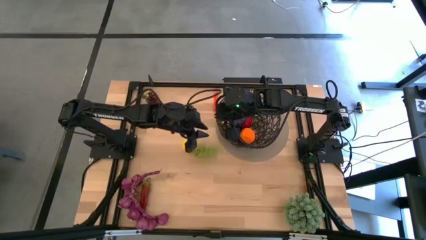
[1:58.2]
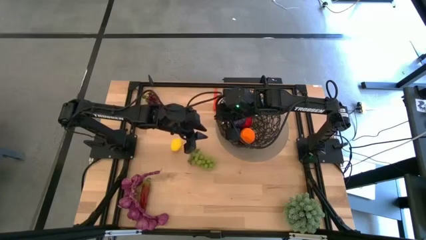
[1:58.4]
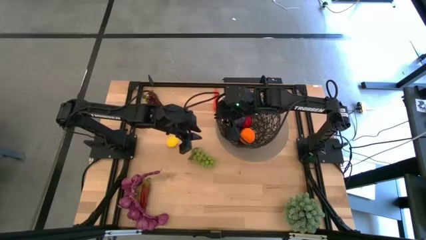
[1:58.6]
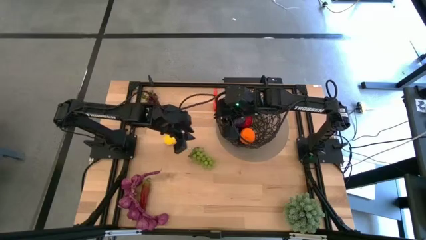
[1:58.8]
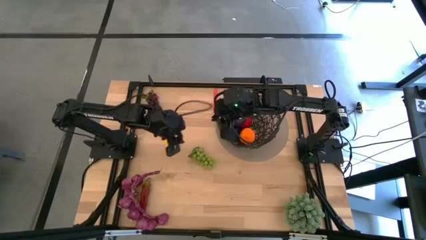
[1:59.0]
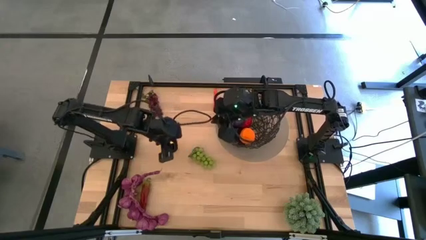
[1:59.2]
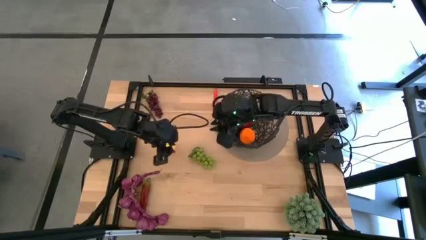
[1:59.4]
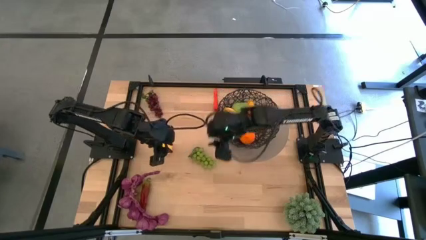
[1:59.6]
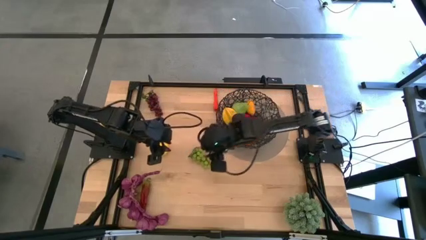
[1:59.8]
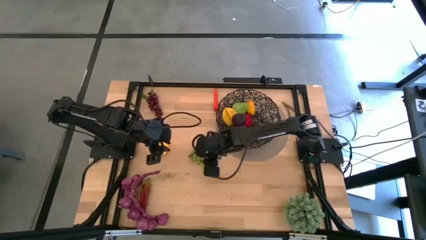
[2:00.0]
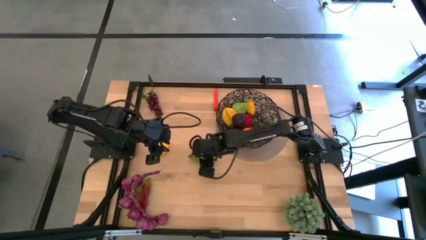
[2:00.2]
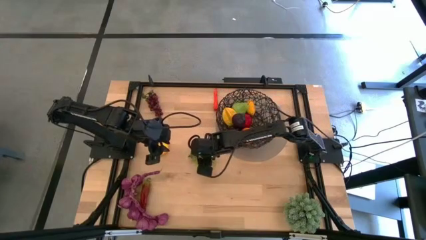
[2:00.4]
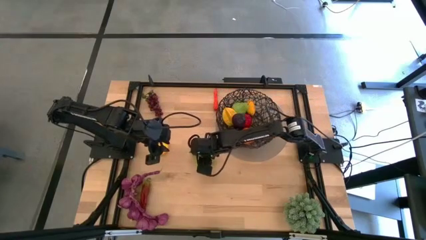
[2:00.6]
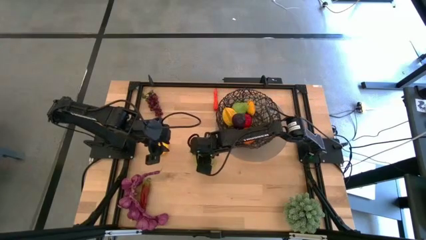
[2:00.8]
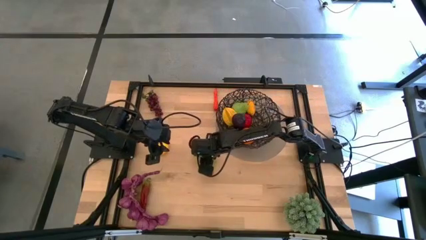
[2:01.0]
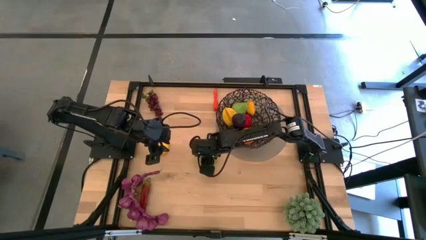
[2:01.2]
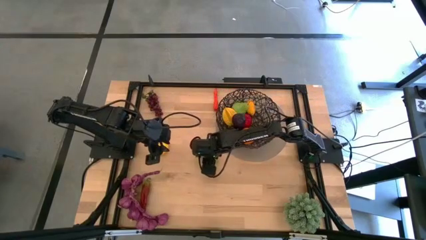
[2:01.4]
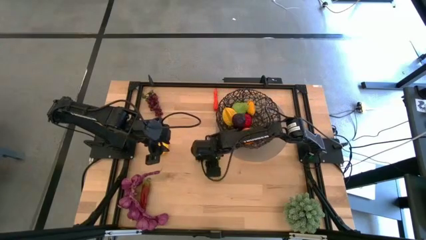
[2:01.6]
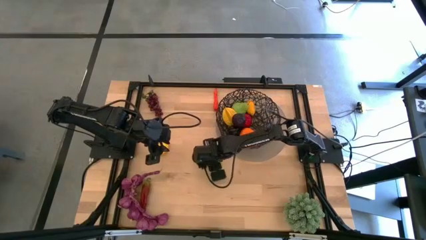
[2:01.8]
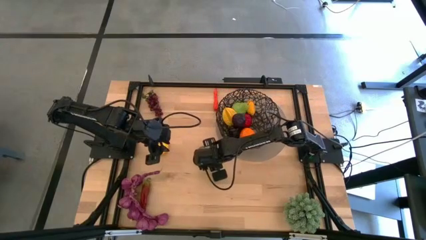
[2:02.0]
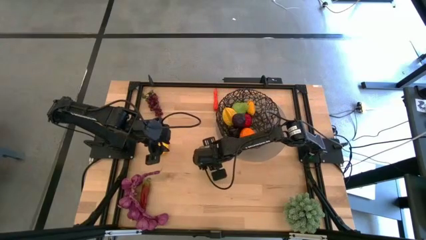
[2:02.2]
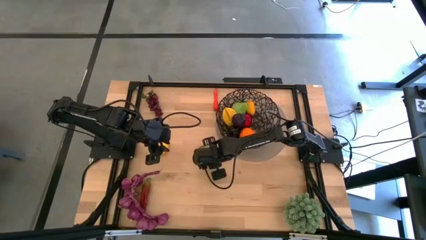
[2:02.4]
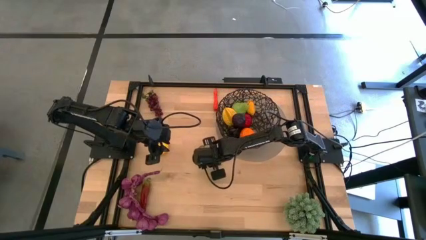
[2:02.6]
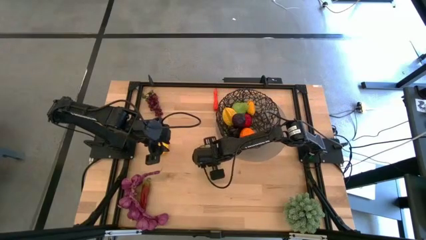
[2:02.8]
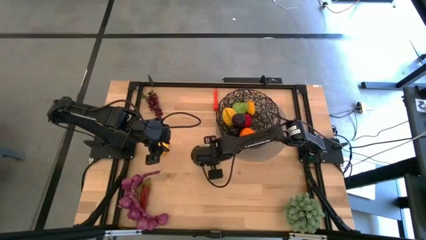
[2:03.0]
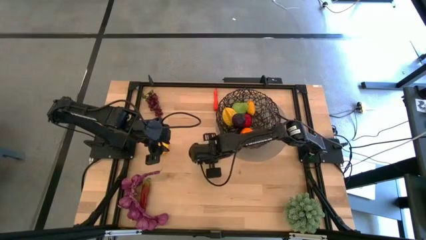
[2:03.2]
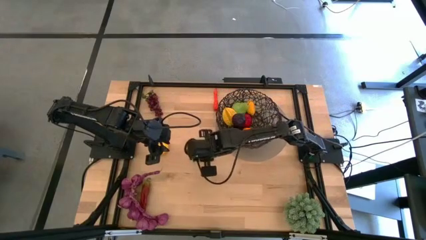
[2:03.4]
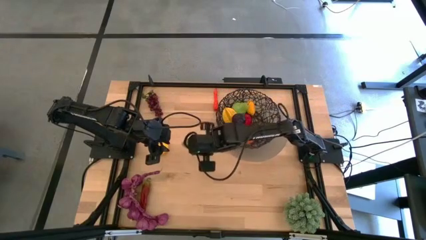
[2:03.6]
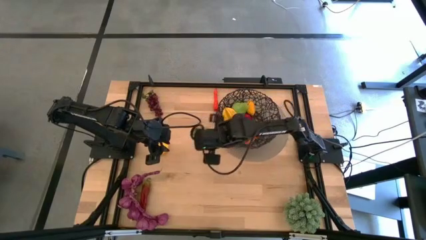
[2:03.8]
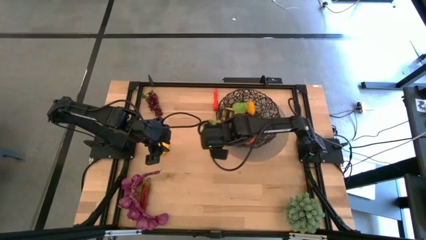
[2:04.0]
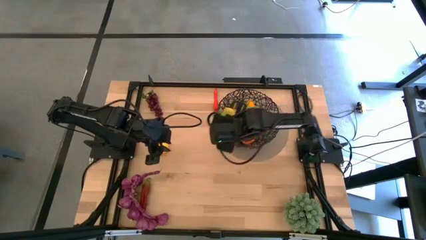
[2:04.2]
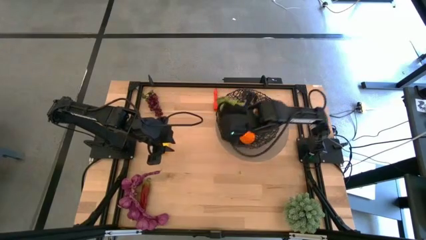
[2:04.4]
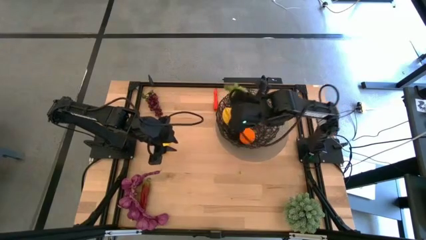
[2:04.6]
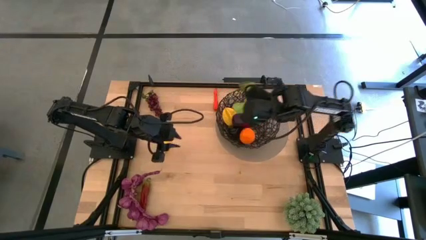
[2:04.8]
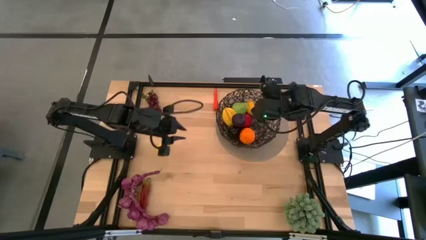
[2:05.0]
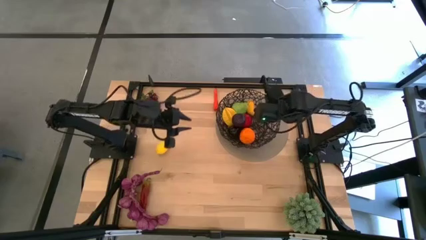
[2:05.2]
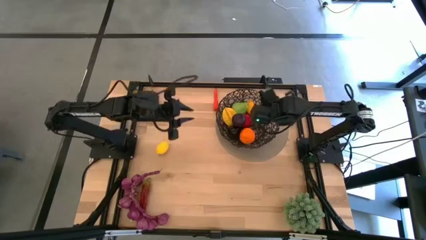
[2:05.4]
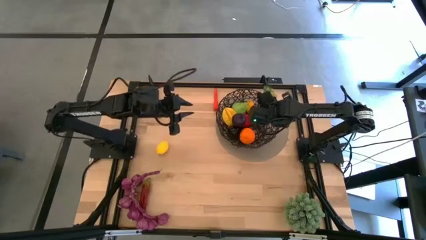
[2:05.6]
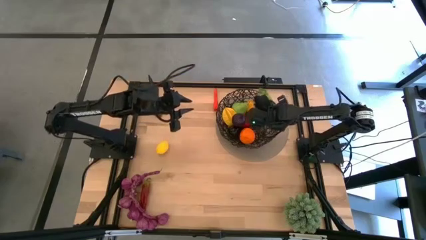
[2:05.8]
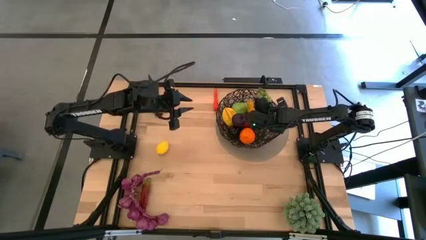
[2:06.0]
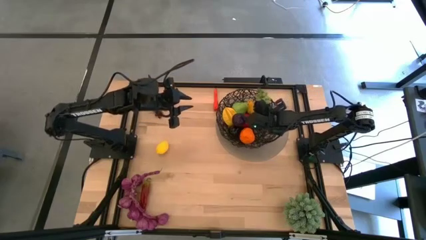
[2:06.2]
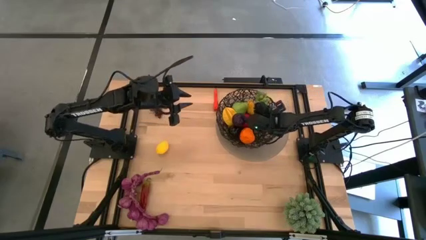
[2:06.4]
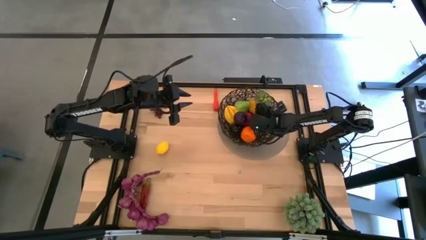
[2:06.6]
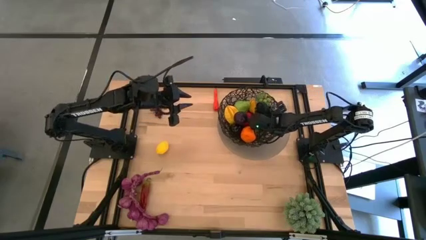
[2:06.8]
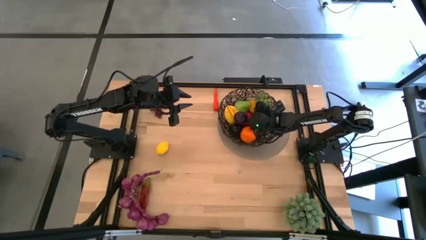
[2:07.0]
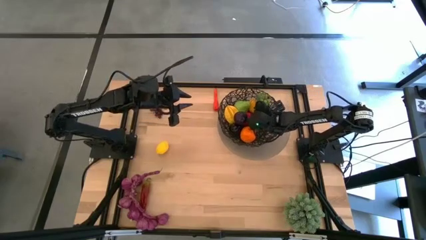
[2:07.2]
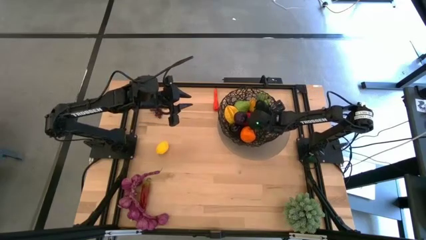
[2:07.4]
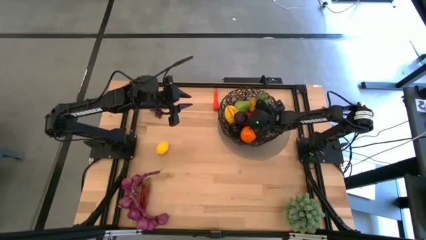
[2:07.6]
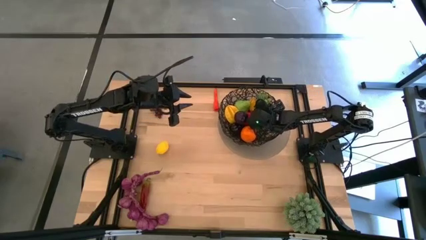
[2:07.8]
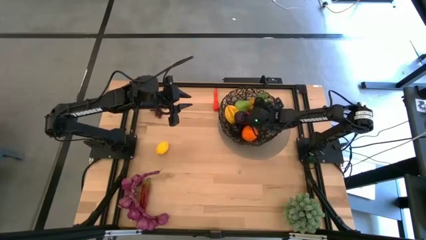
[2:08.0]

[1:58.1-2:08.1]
Task: Build produce basket
Put the green grapes into the black wire basket

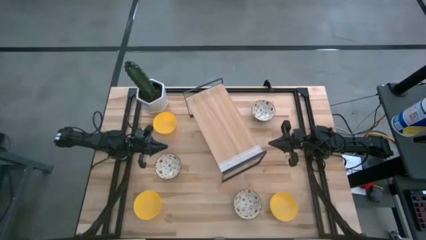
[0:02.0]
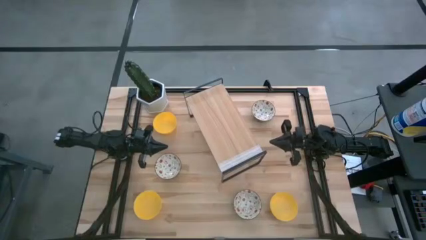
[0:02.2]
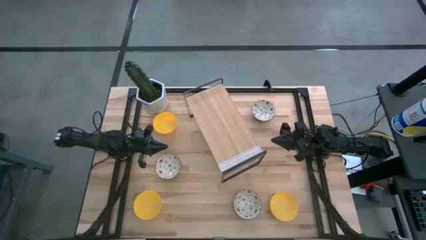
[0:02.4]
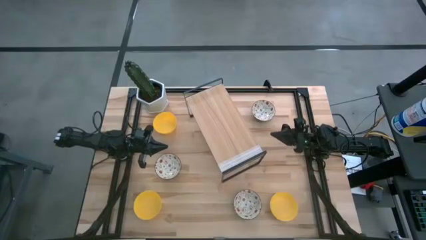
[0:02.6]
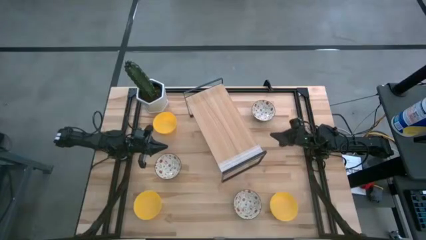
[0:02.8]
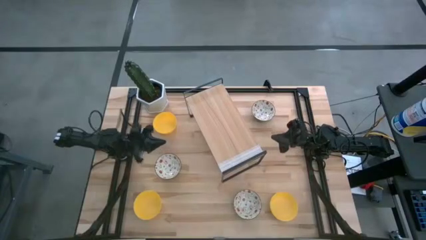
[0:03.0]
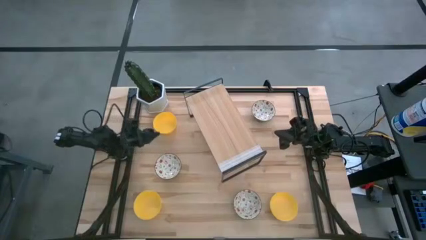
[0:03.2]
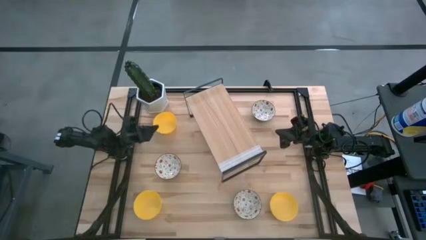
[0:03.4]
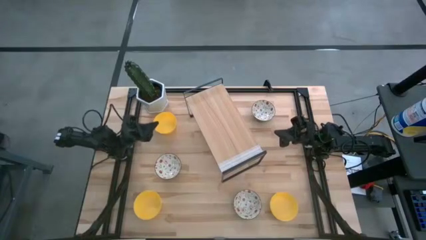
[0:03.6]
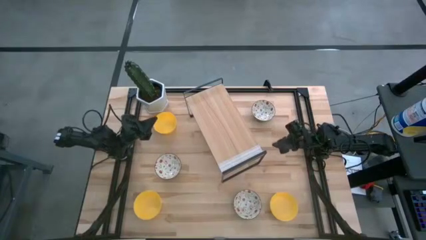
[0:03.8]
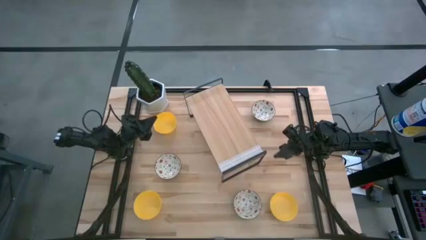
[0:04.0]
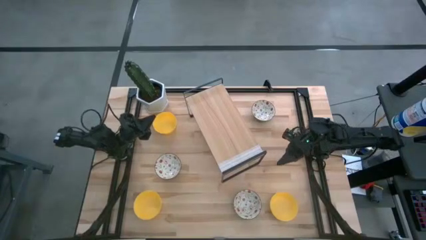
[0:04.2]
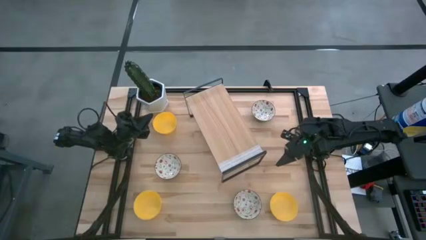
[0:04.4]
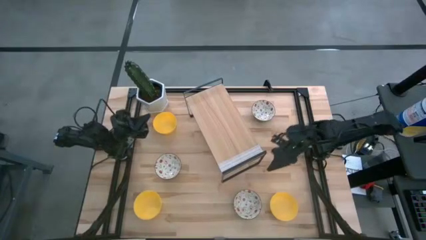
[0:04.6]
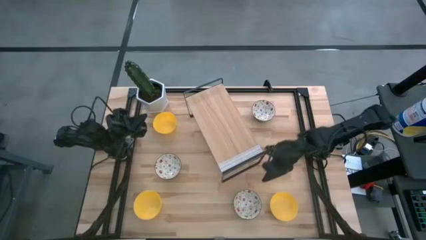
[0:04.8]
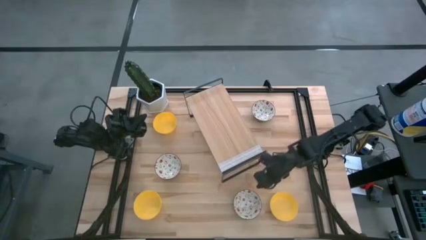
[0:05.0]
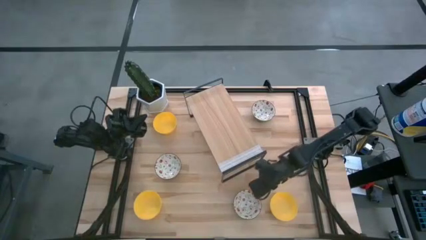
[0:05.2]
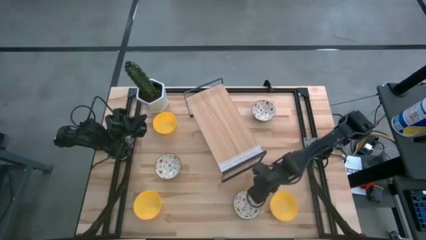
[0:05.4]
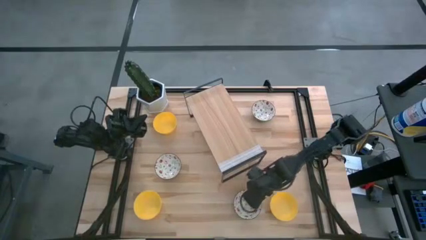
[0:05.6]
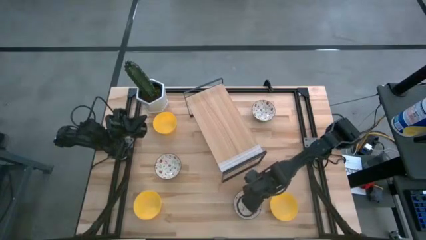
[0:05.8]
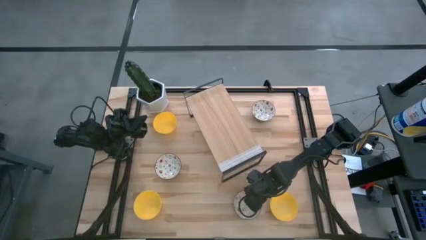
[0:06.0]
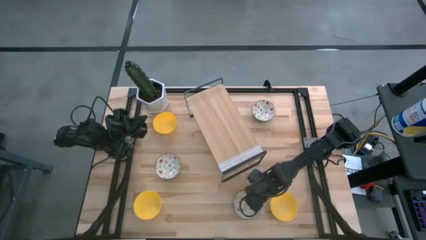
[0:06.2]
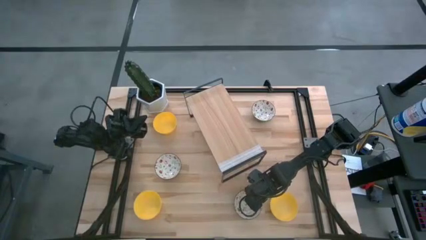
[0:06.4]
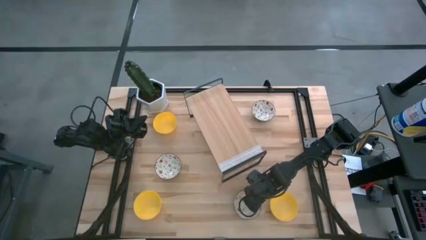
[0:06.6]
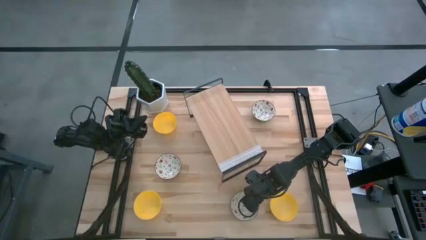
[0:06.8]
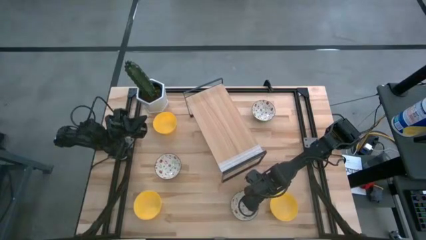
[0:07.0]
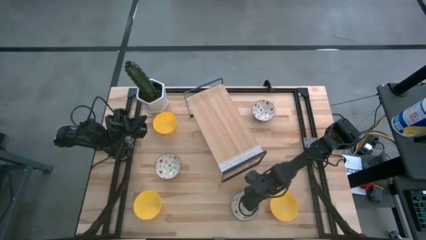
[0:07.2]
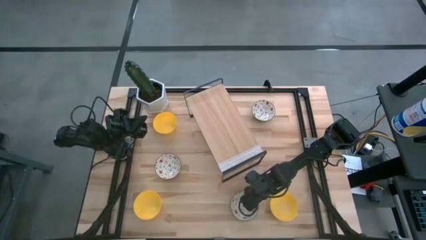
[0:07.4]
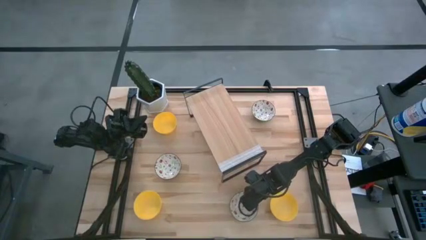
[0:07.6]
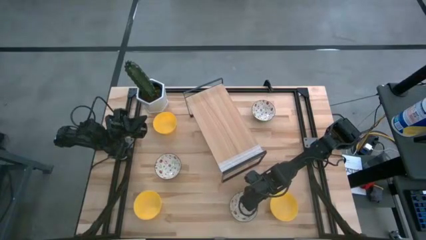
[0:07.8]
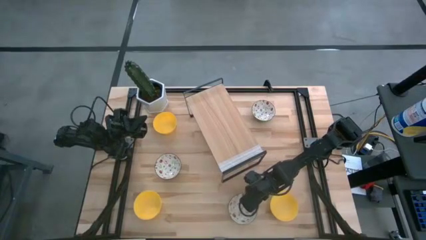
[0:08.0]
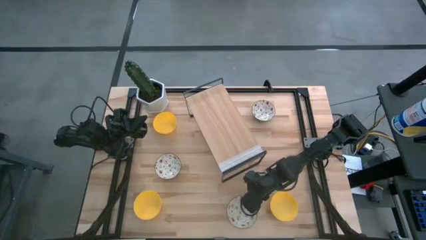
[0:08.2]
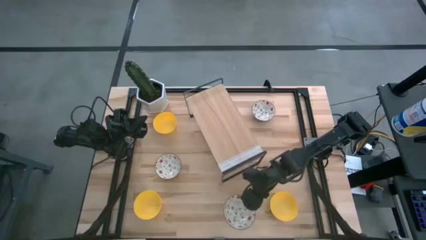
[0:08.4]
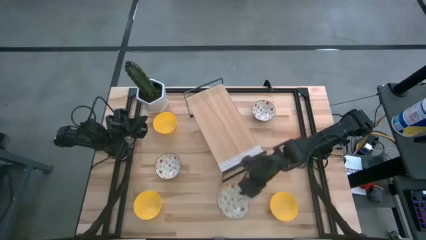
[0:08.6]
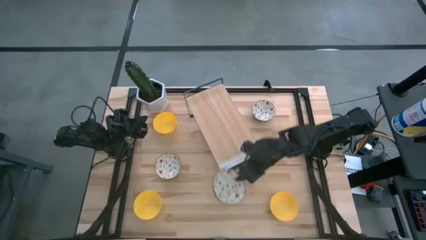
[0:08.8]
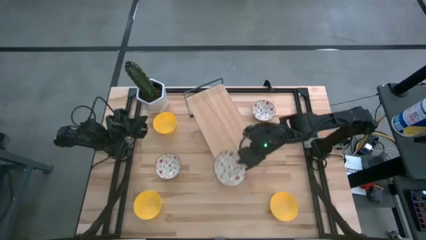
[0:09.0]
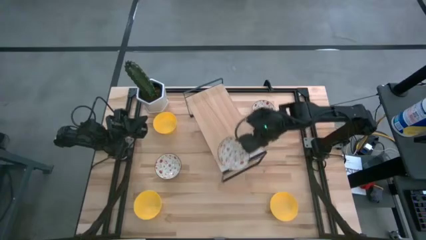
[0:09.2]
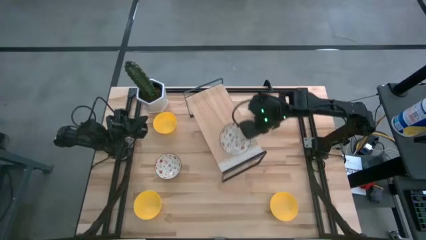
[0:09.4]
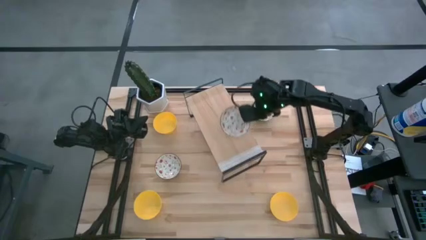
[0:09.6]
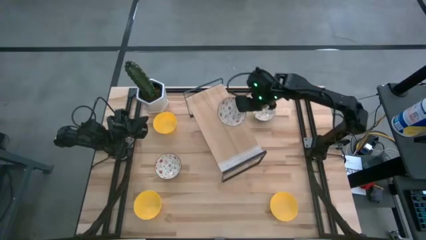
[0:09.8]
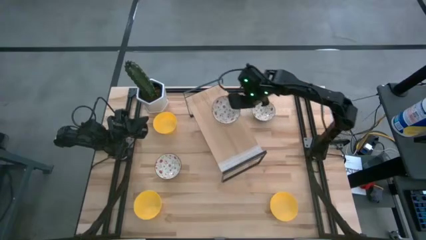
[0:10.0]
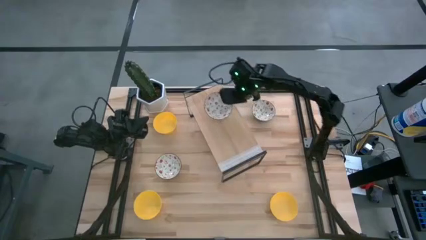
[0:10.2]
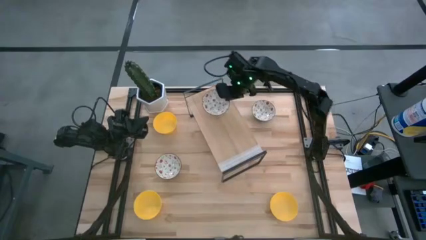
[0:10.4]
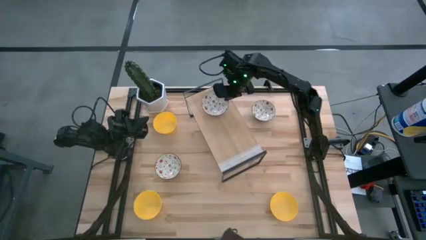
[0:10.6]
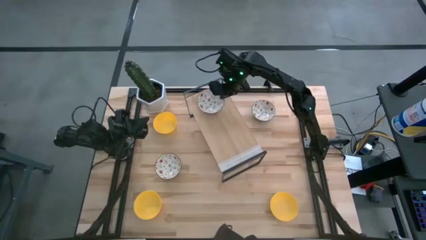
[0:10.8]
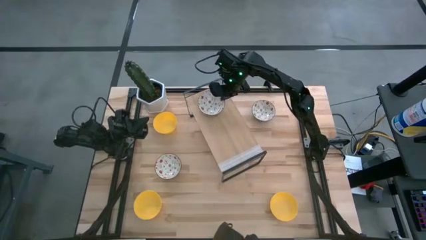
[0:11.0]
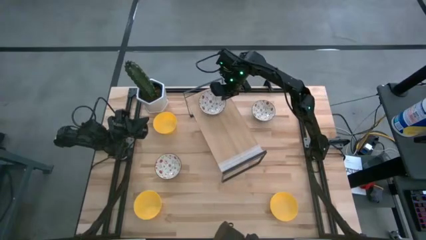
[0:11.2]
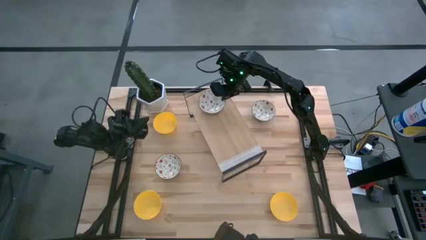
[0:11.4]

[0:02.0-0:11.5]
Task: Pick & Place Mini bowls
Put the bottom white patterned bowl on the shelf
